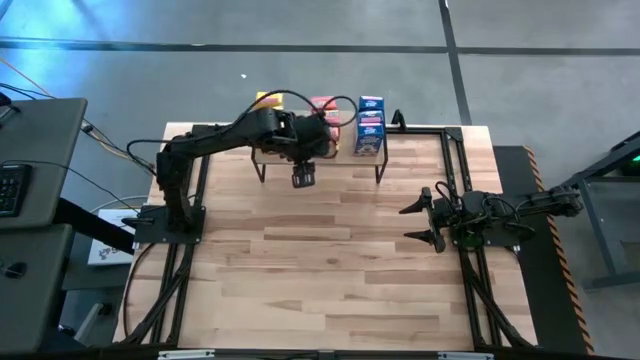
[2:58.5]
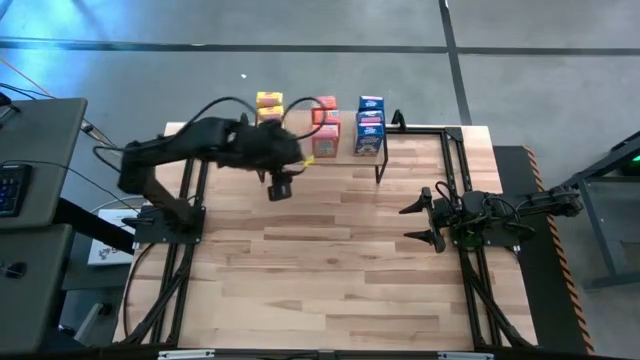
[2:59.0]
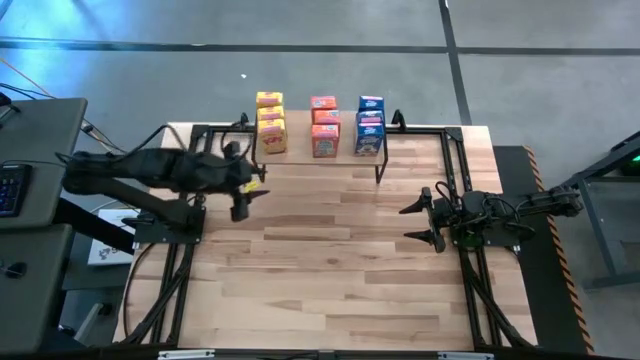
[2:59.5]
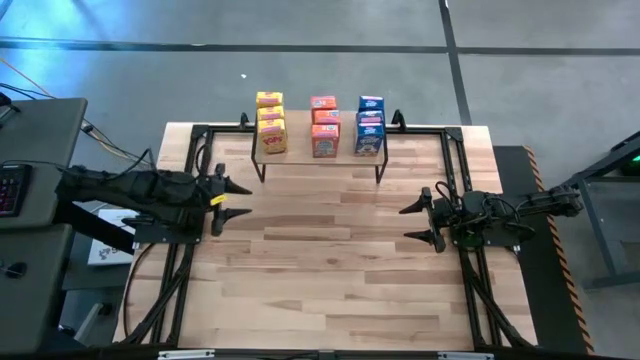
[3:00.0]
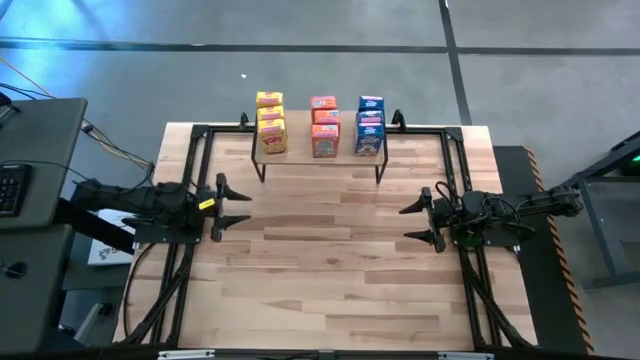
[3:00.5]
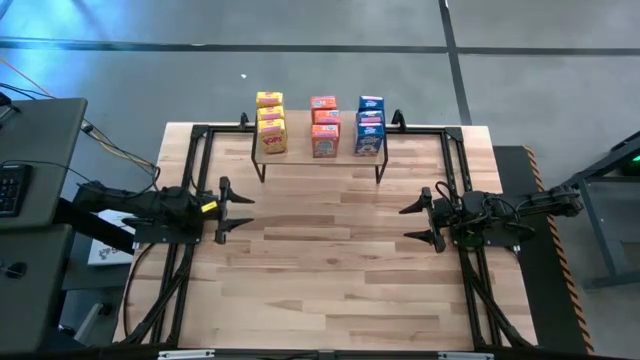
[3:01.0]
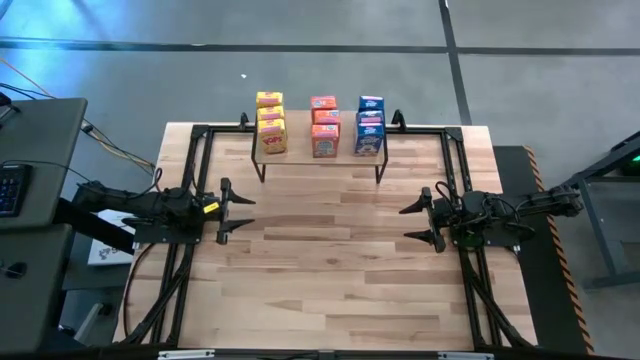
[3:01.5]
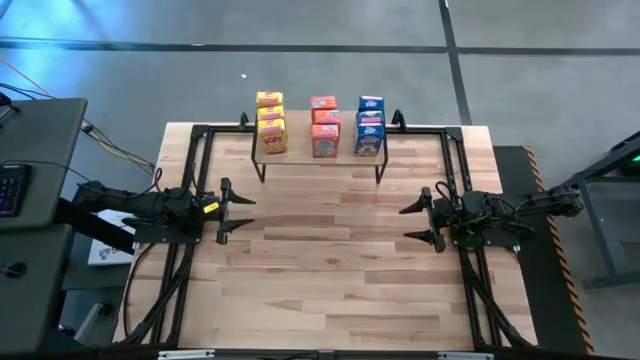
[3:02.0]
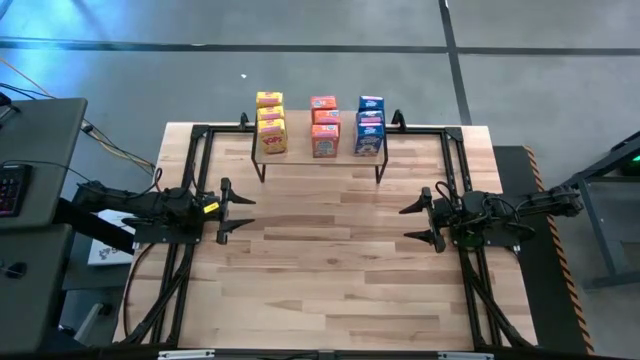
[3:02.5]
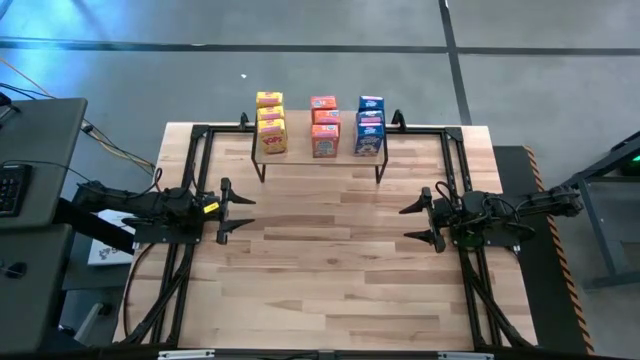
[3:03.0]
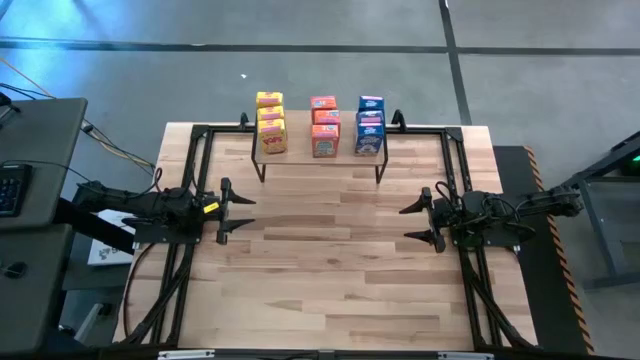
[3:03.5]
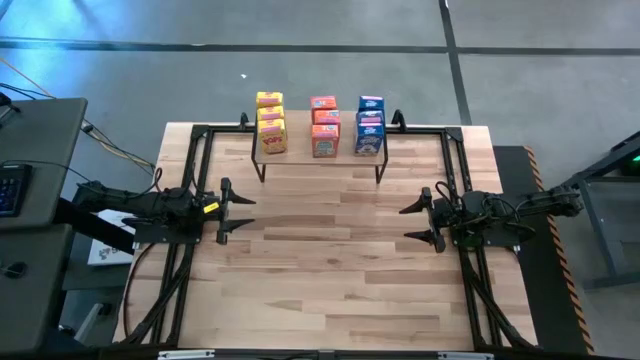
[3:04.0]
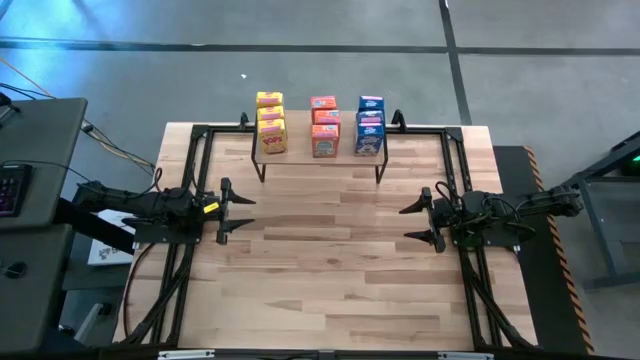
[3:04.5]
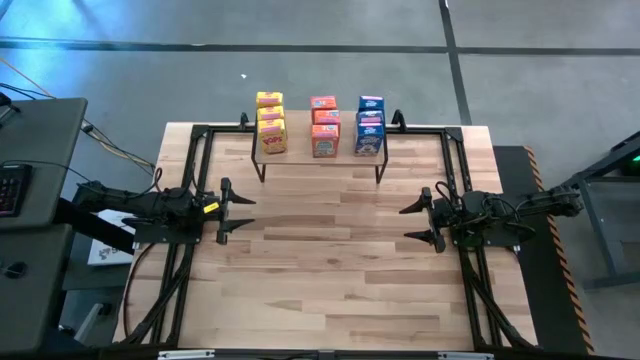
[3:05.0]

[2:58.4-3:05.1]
Task: Stack cereal on shelf
Return to Home Position

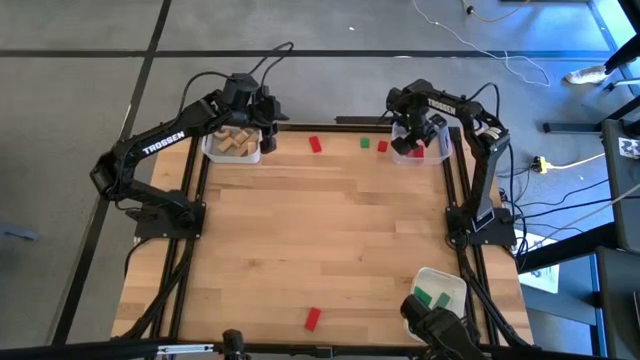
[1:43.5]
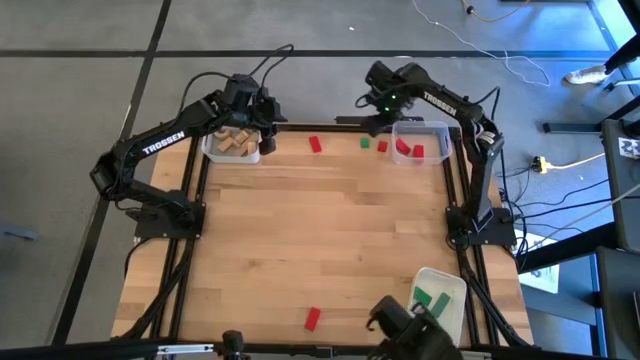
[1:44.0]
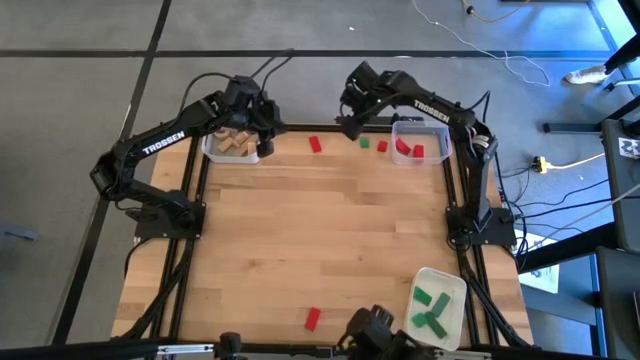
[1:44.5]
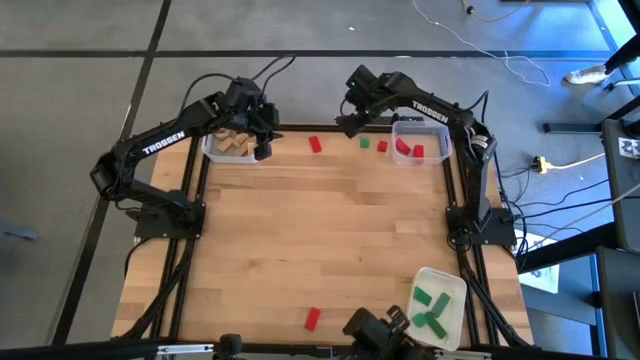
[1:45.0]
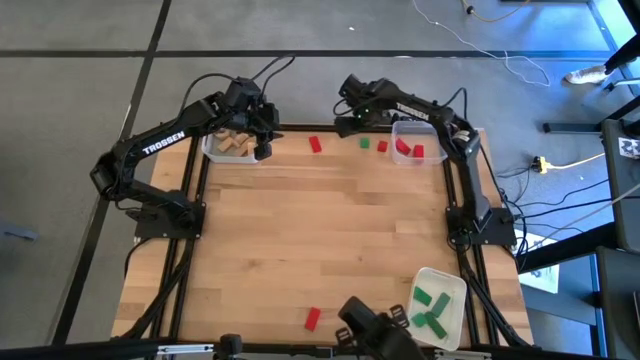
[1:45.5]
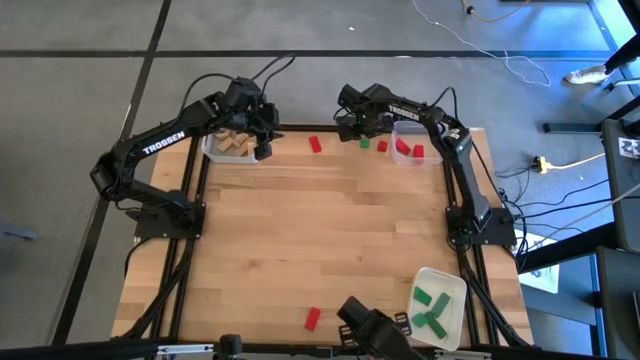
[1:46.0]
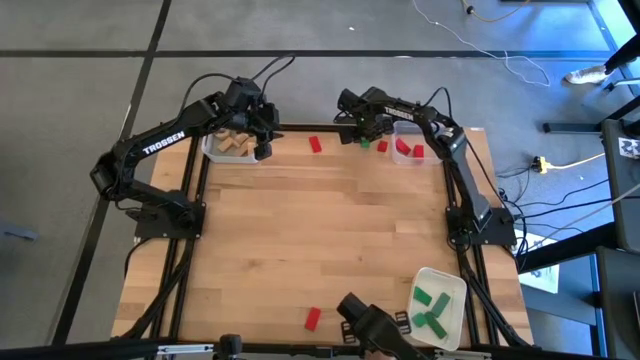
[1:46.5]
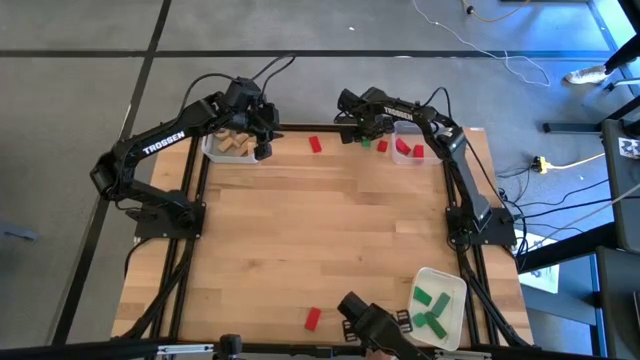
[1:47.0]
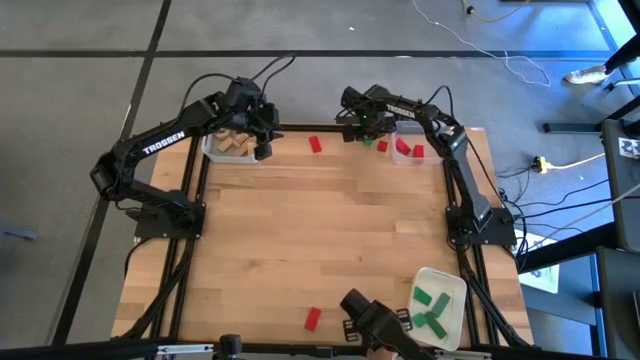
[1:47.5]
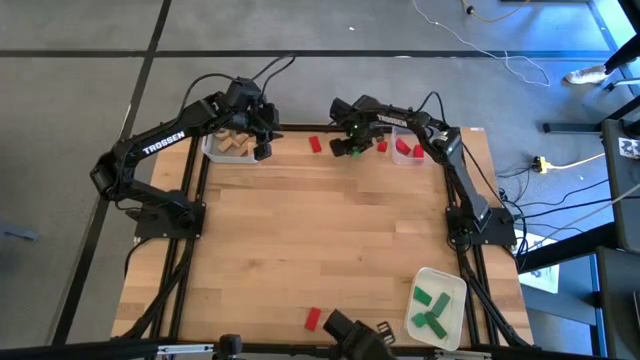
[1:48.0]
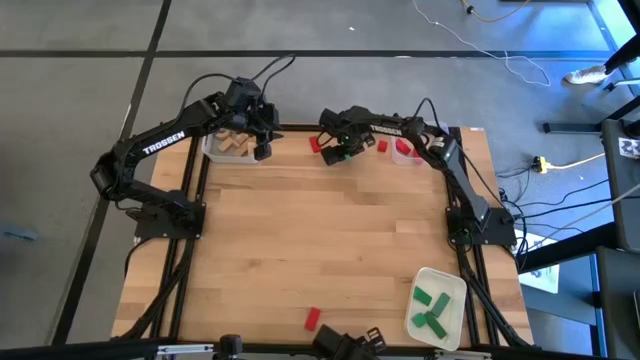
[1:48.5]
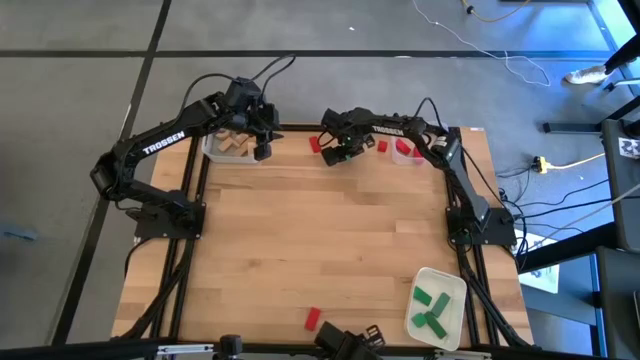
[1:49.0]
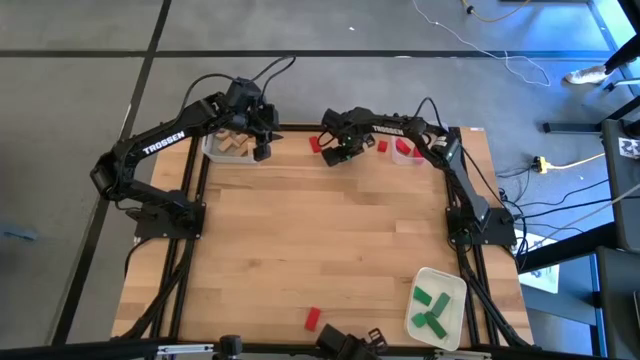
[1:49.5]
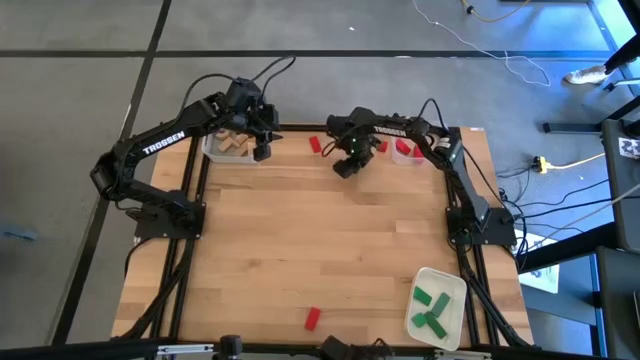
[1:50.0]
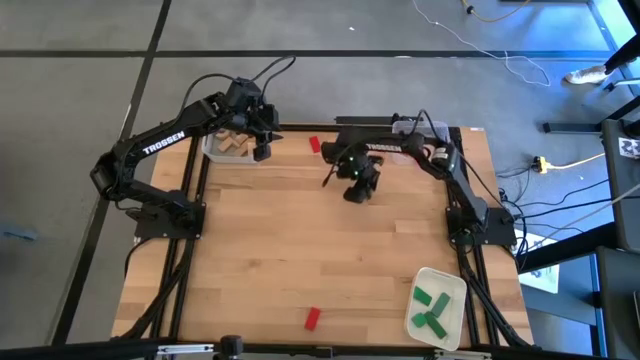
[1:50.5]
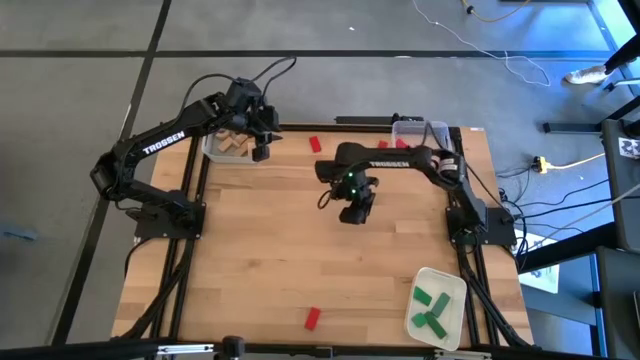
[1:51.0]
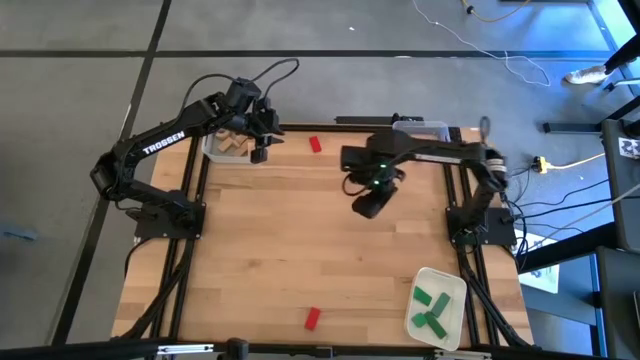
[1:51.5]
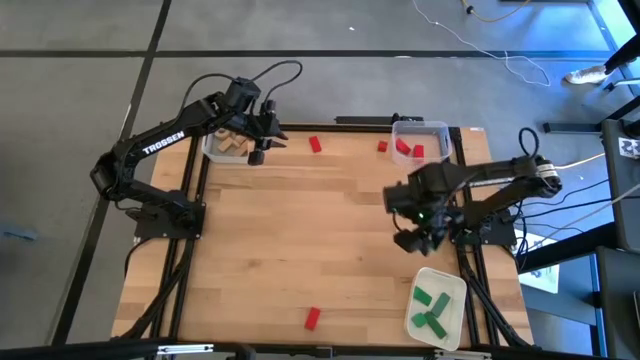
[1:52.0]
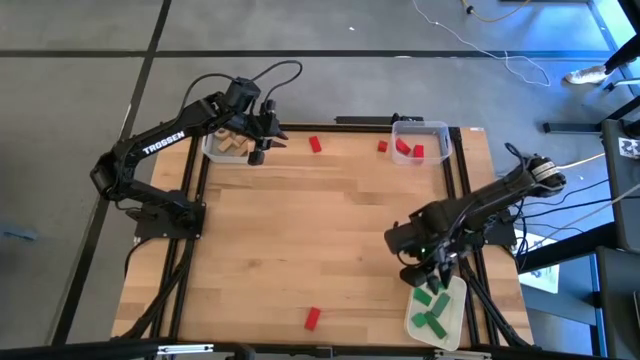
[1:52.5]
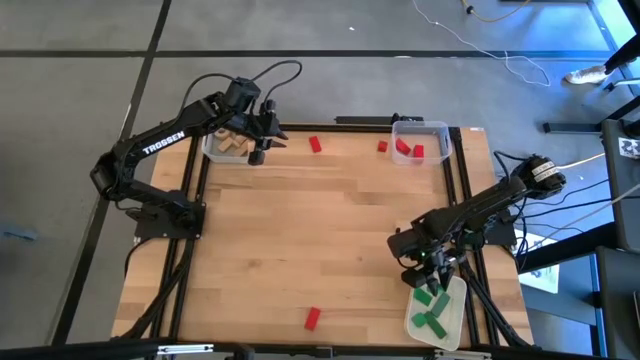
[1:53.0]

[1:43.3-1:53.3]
Task: Sort & place blocks by color
Put the green block into the white bin
